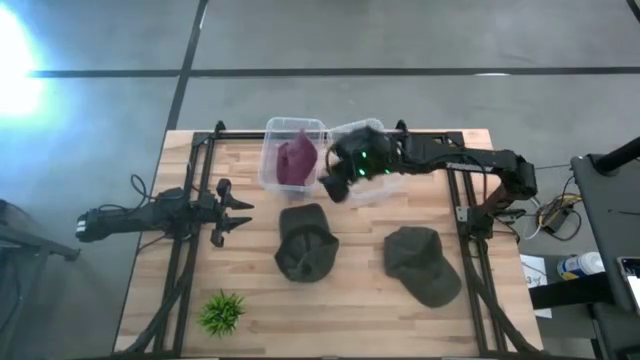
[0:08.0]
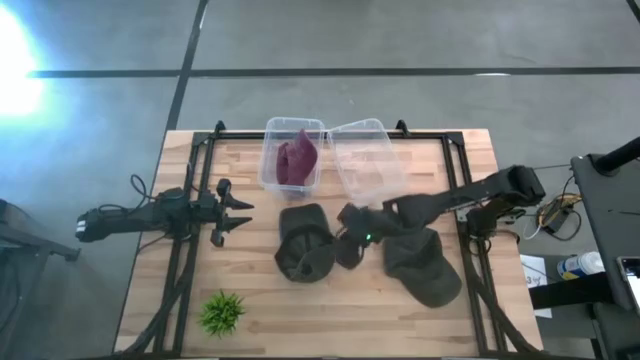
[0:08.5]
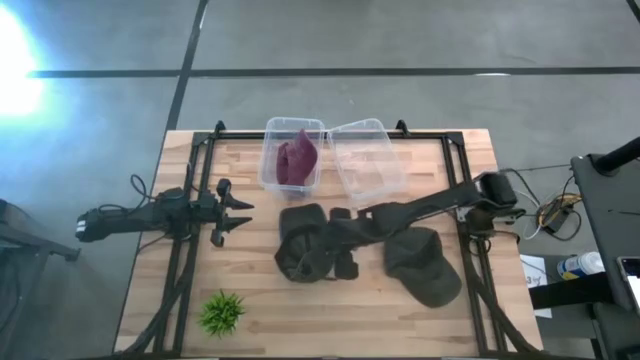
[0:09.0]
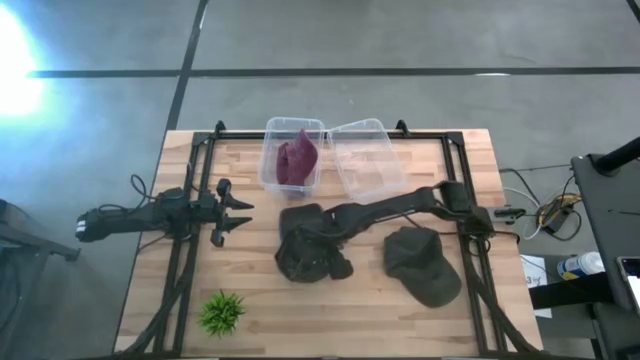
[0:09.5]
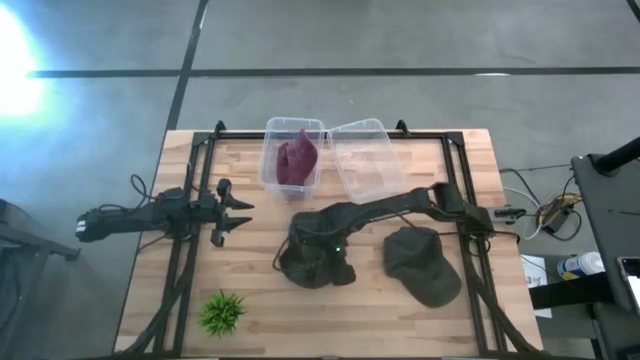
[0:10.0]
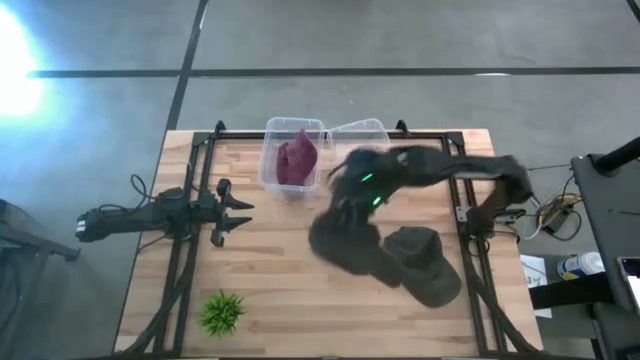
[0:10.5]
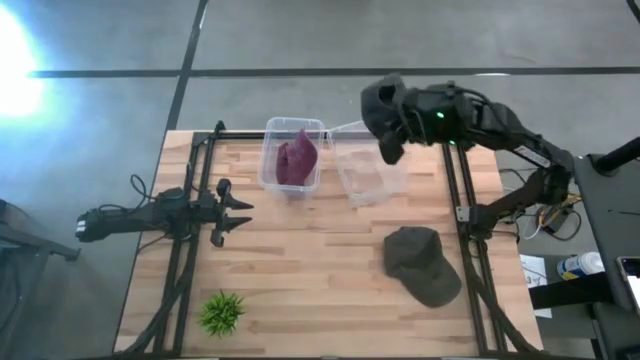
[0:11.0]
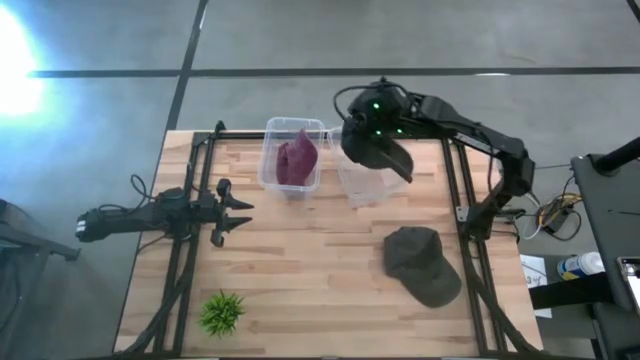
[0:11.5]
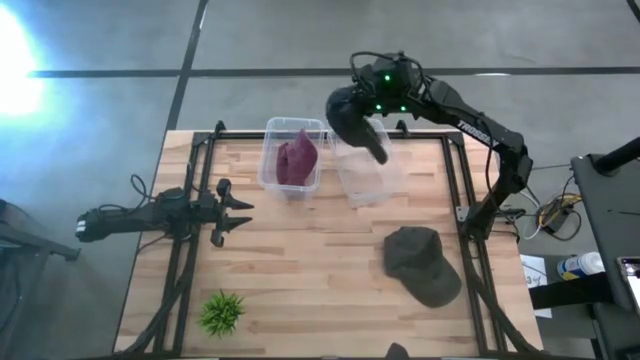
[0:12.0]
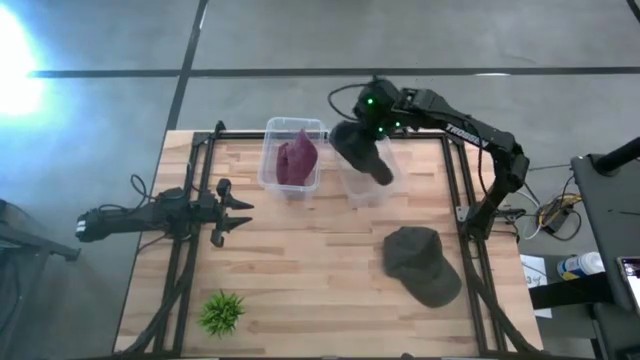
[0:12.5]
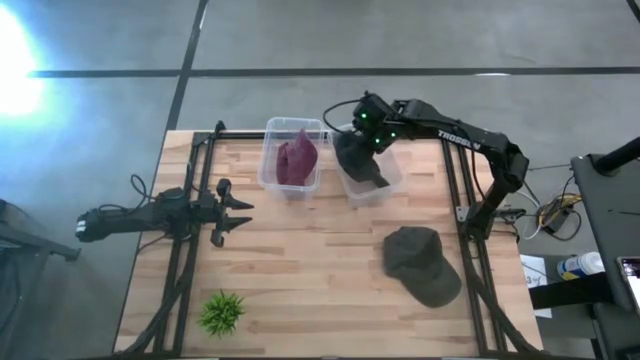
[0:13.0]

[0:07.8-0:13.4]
Task: Pick & Place hat
Put the left black cap into the right transparent bin

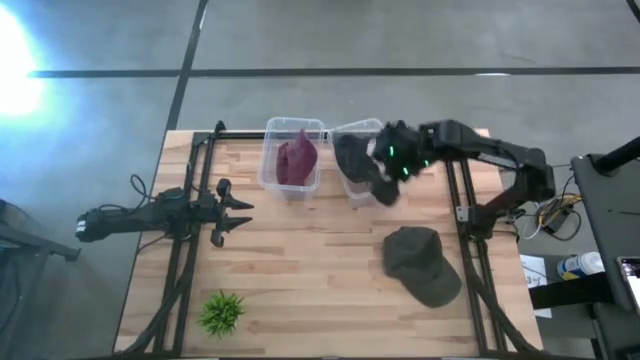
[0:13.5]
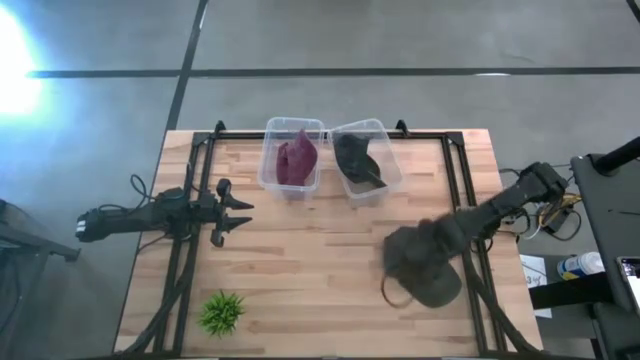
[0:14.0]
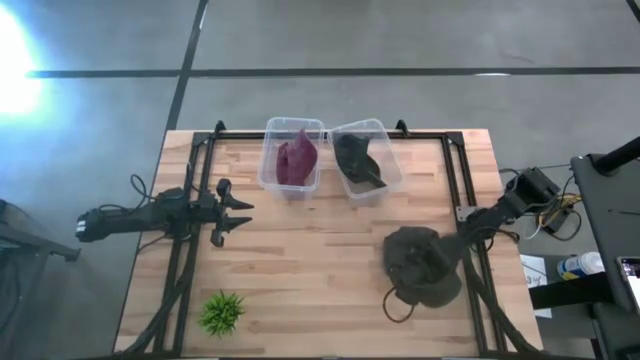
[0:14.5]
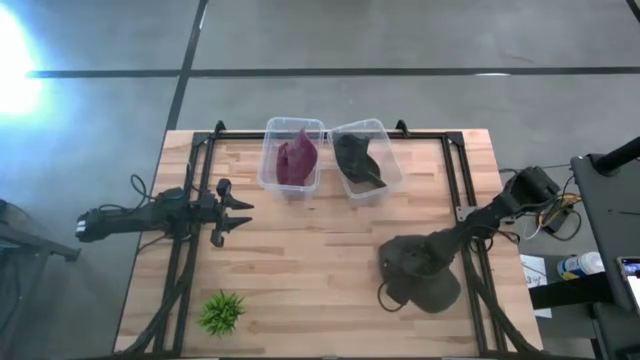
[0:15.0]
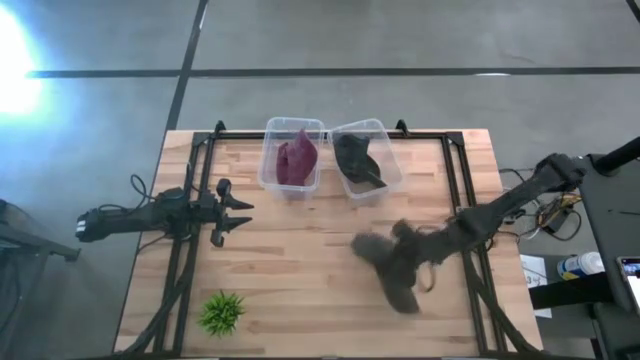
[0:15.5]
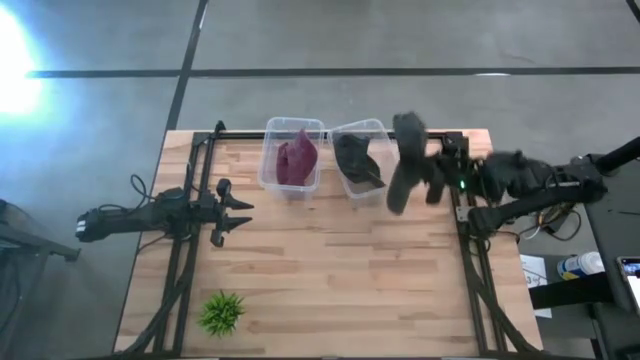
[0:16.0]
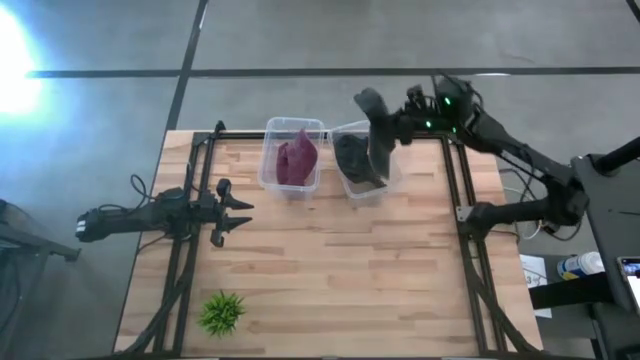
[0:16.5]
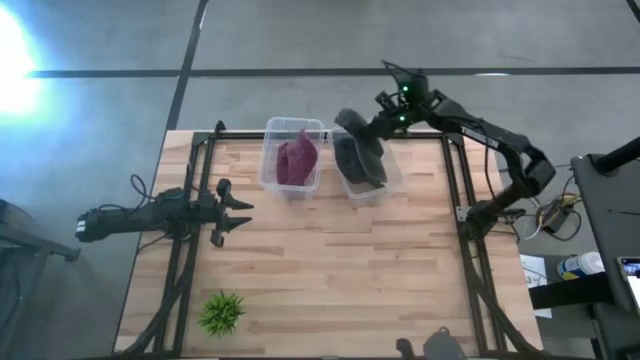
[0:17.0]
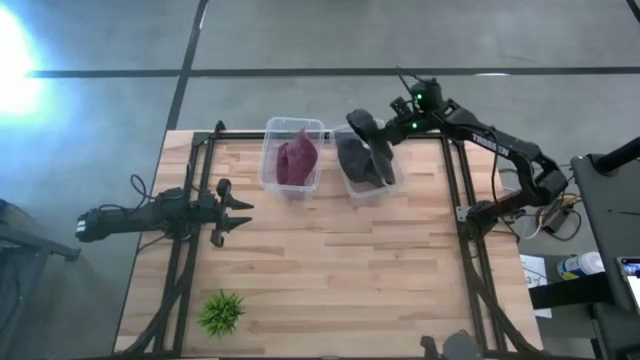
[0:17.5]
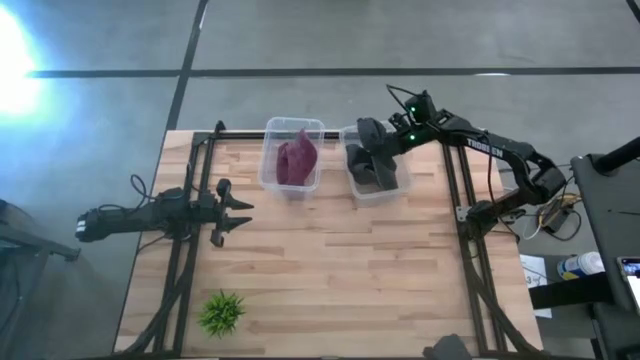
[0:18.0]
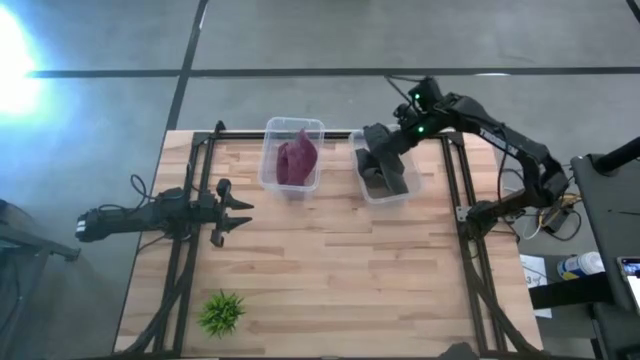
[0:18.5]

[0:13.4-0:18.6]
Put the black cap into the right transparent bin

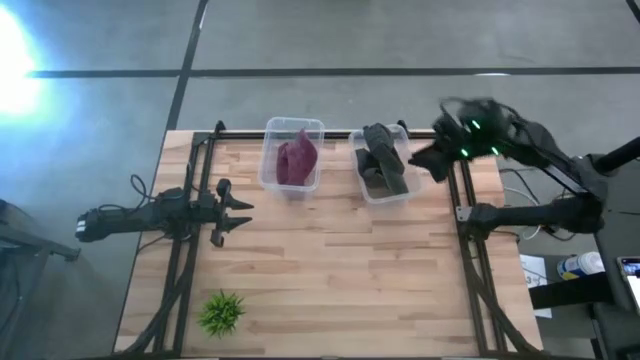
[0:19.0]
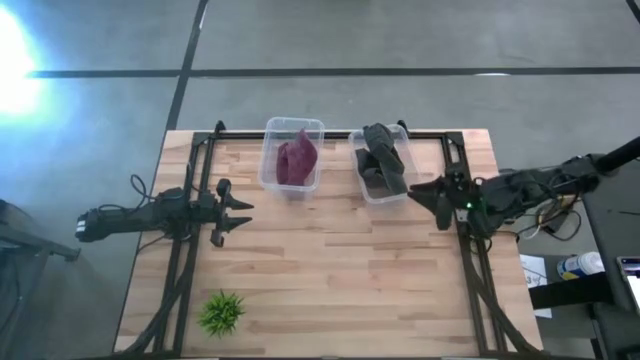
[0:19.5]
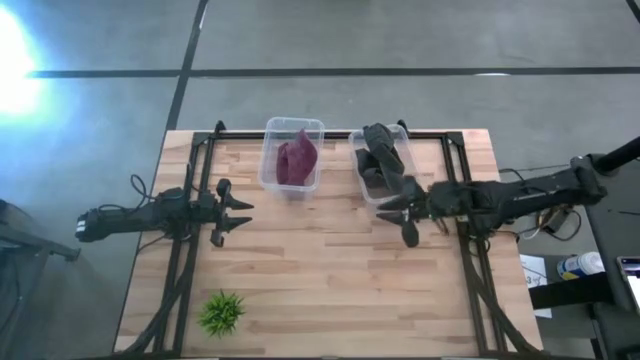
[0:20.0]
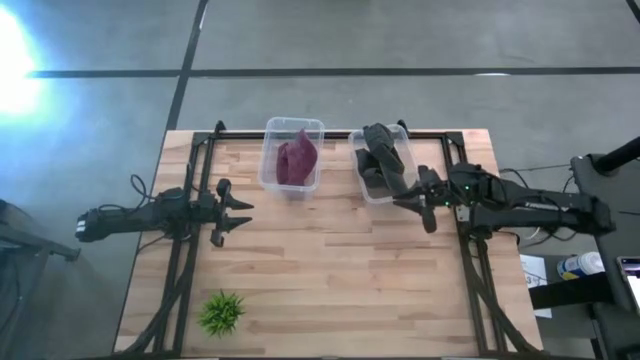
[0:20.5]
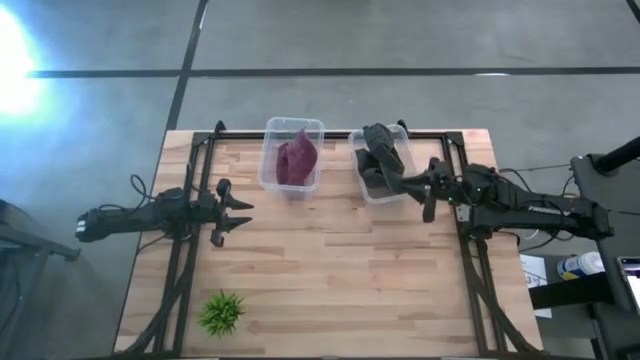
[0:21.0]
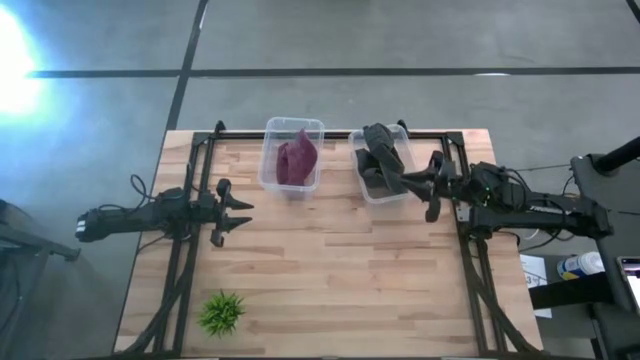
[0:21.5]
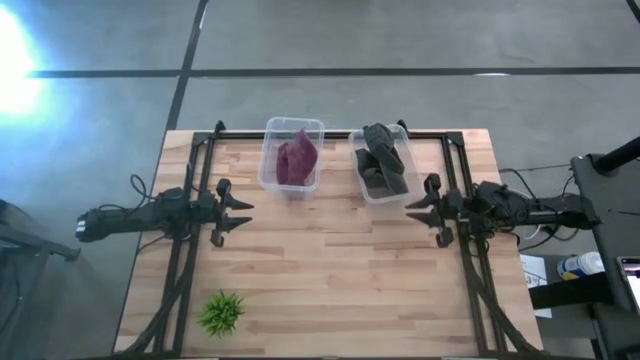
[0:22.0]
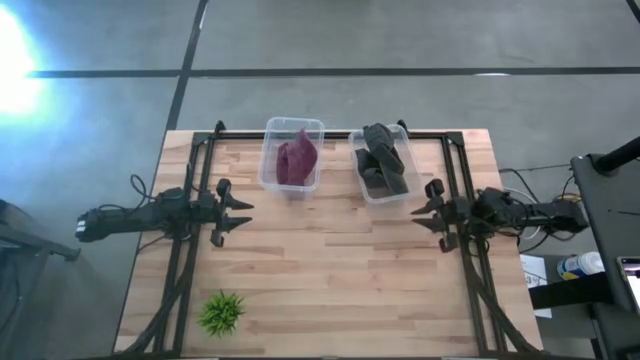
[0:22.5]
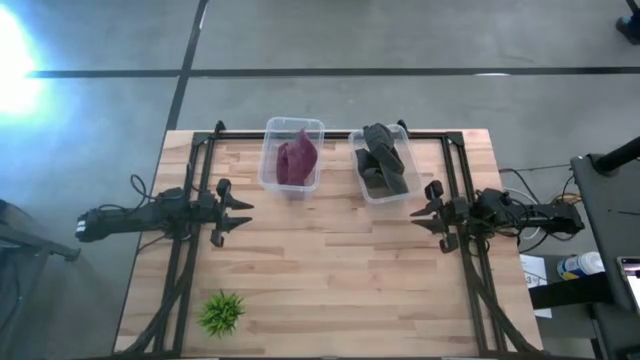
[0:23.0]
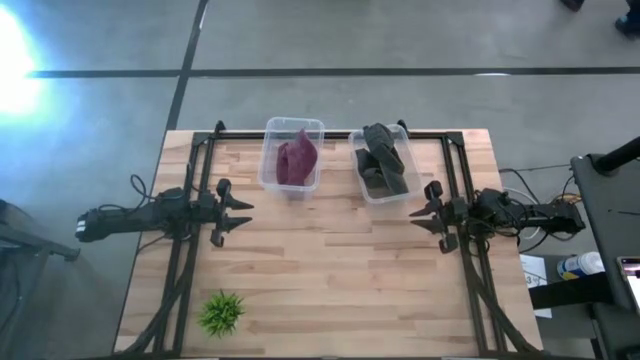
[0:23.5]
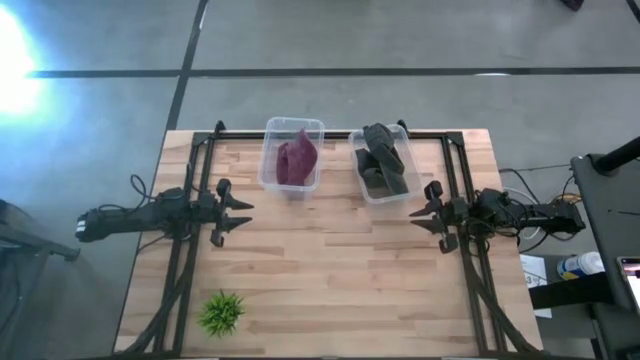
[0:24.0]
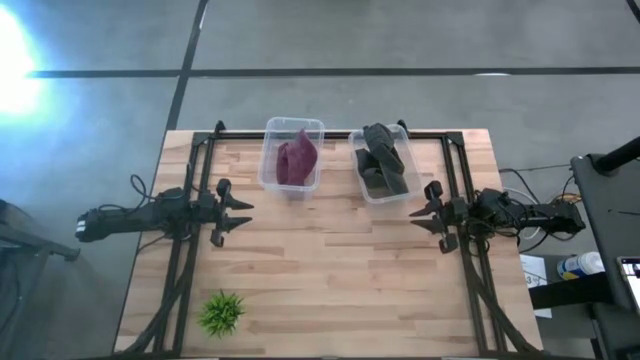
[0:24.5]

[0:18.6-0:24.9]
Return to Home Position

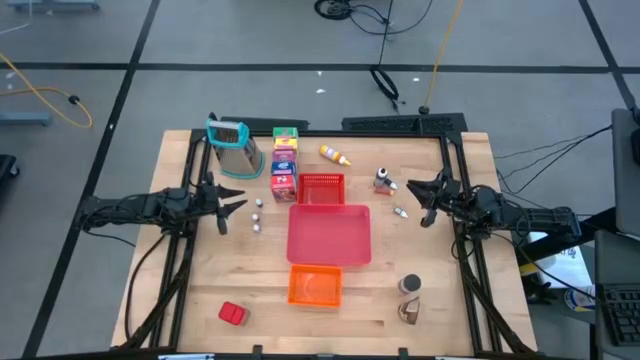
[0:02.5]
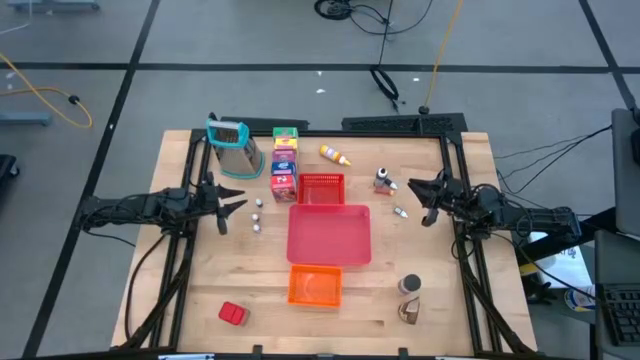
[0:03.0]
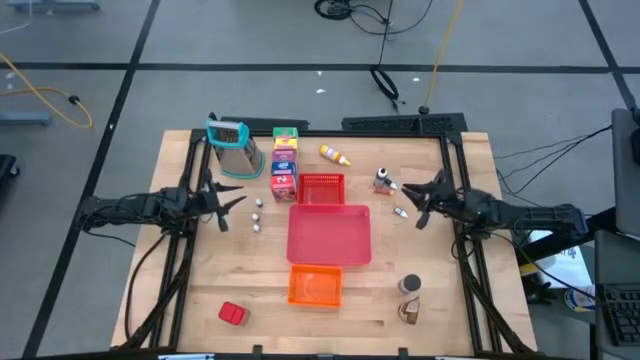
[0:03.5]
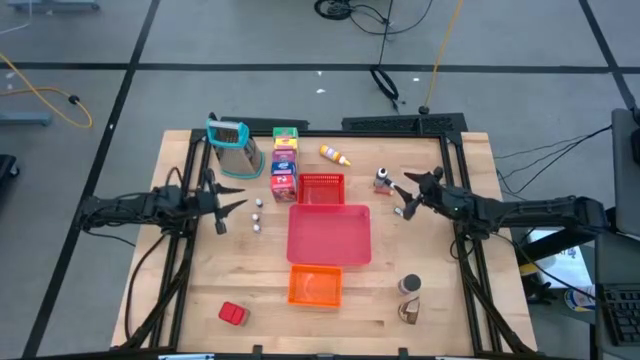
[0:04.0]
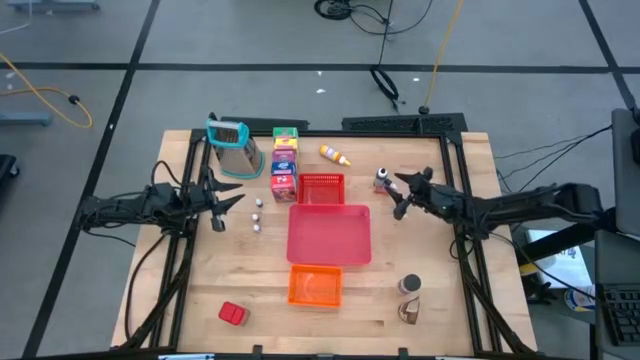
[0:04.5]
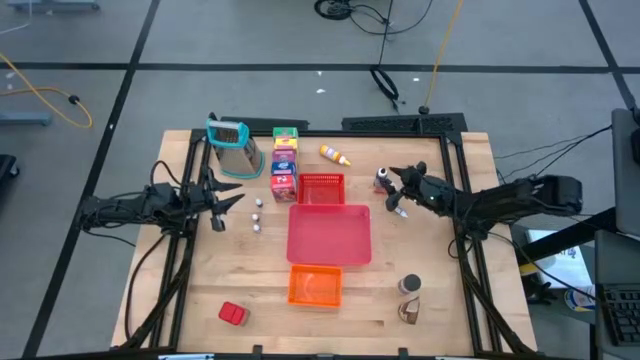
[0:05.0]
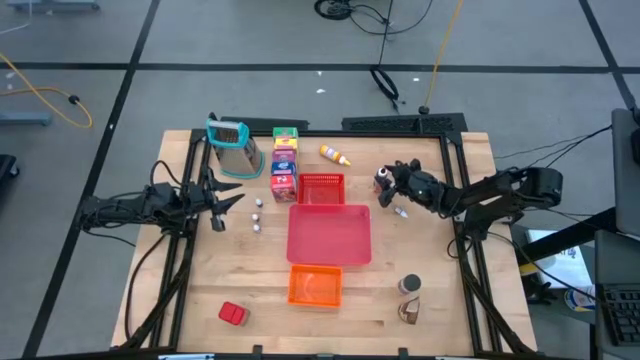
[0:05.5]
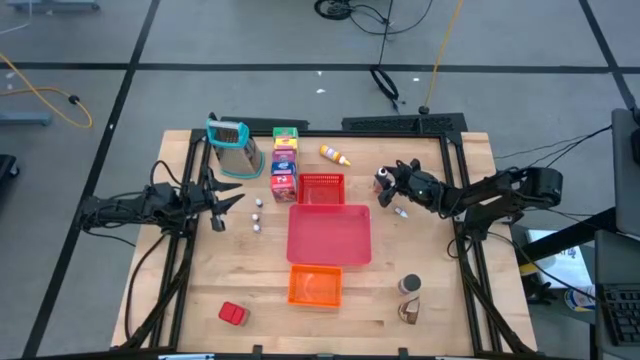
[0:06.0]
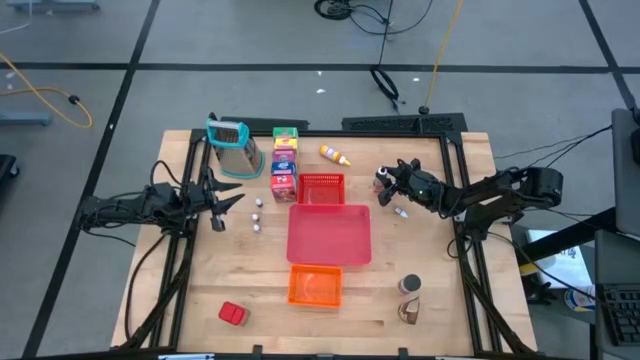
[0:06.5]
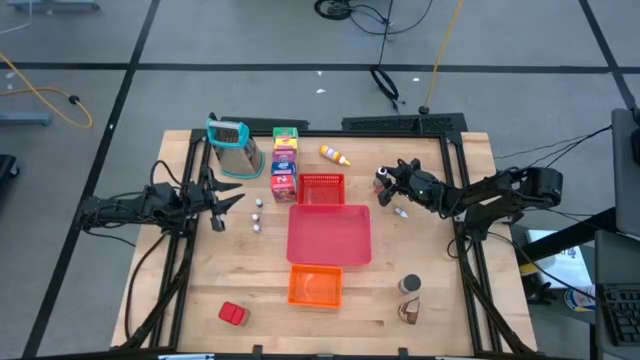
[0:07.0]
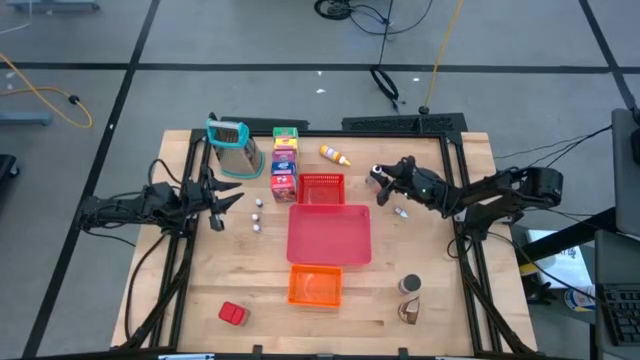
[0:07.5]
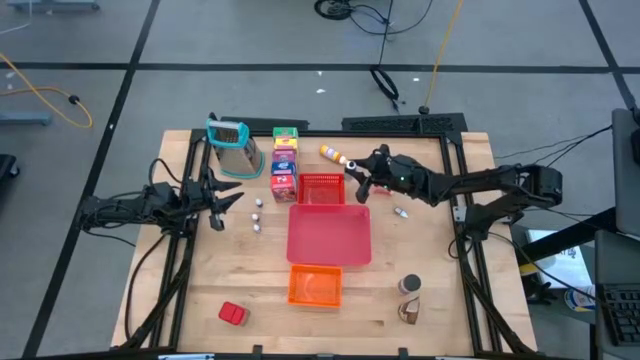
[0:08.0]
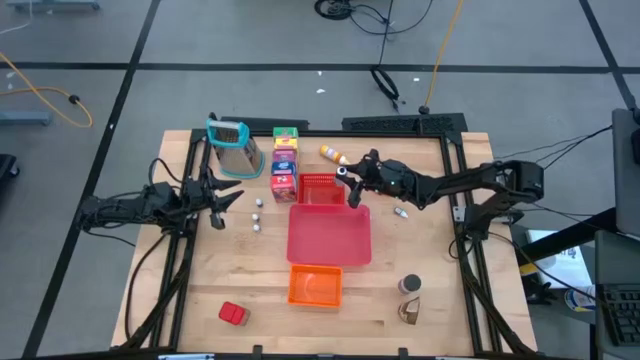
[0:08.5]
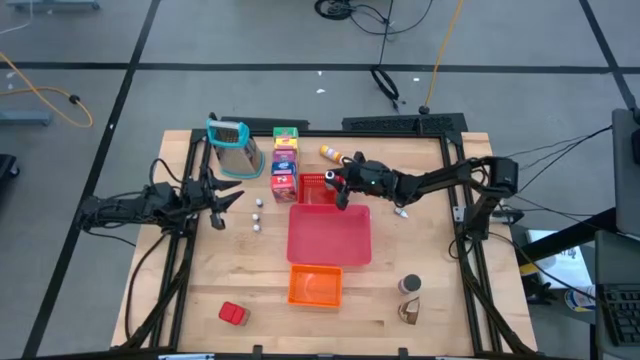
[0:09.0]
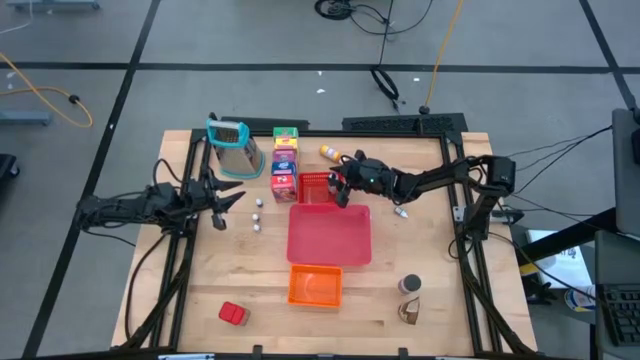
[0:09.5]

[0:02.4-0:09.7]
Task: Pick & Place Kitchen Items
Put the large black food coloring bottle into the red bin
